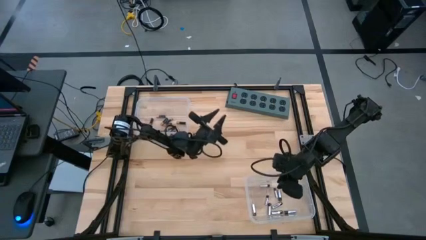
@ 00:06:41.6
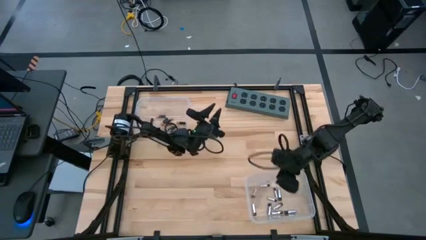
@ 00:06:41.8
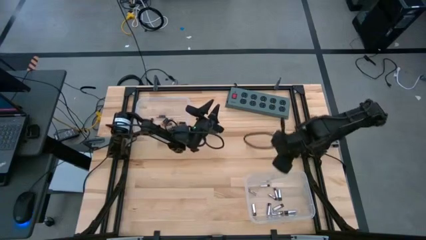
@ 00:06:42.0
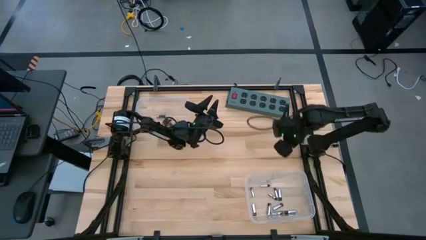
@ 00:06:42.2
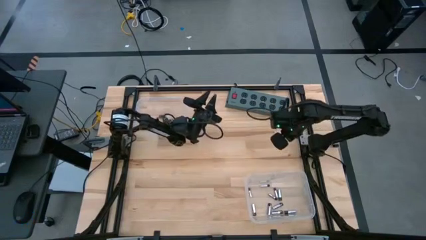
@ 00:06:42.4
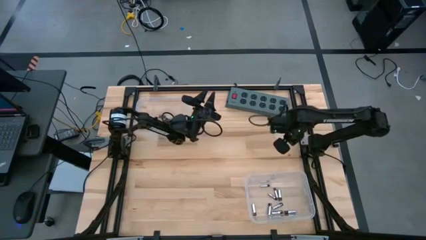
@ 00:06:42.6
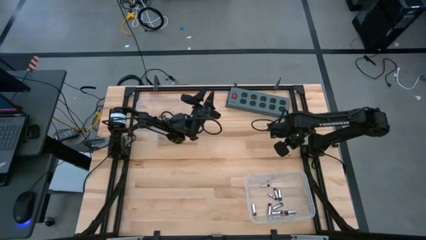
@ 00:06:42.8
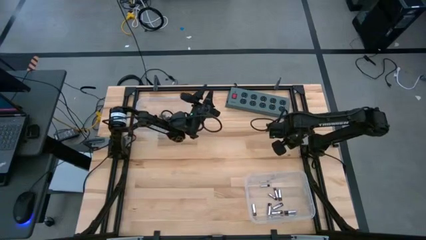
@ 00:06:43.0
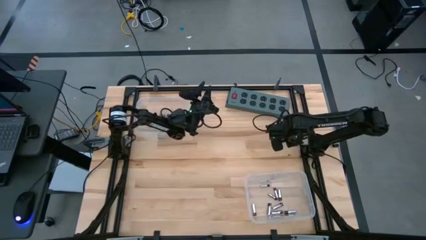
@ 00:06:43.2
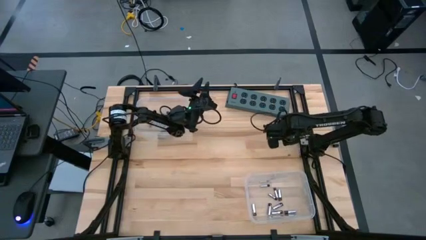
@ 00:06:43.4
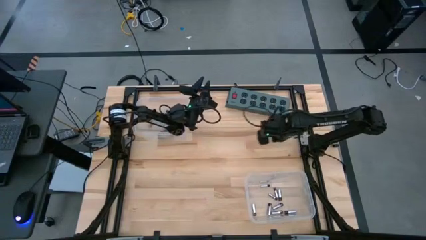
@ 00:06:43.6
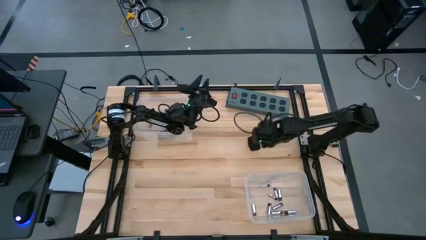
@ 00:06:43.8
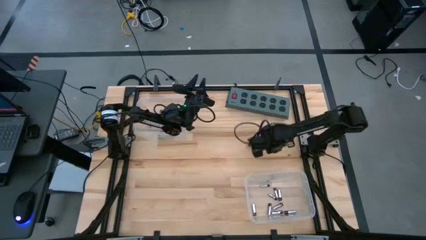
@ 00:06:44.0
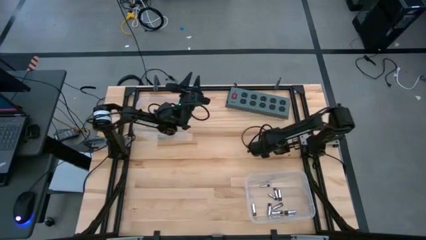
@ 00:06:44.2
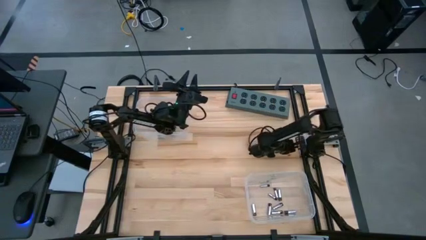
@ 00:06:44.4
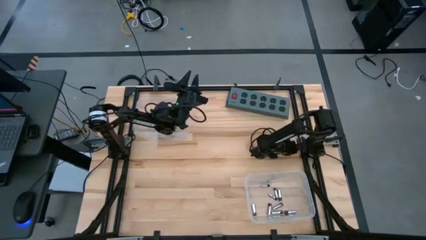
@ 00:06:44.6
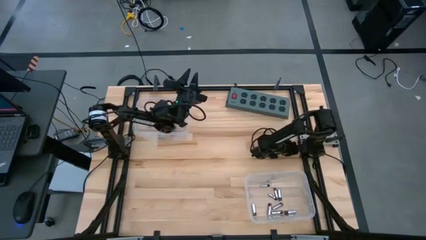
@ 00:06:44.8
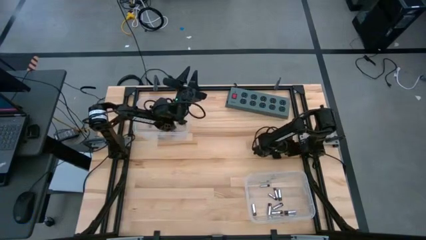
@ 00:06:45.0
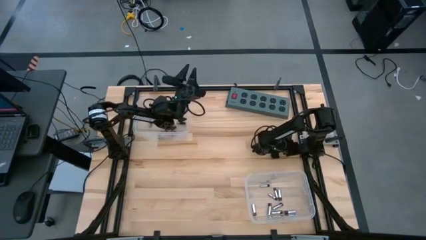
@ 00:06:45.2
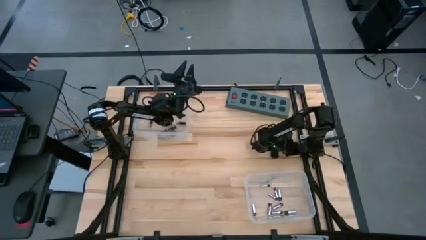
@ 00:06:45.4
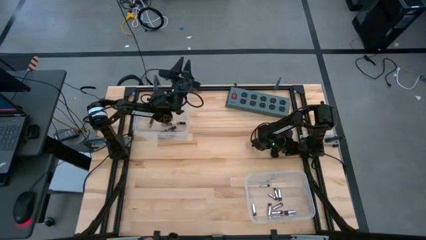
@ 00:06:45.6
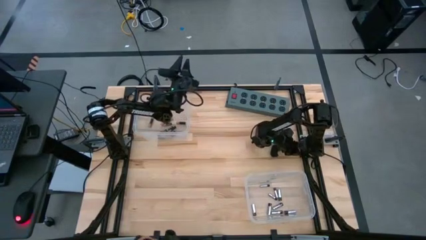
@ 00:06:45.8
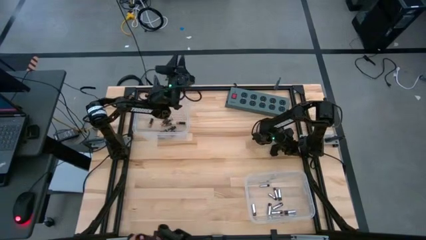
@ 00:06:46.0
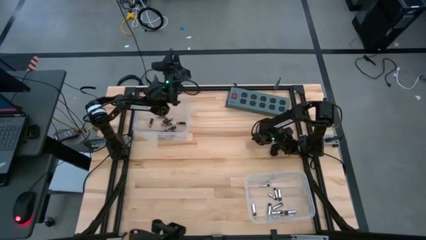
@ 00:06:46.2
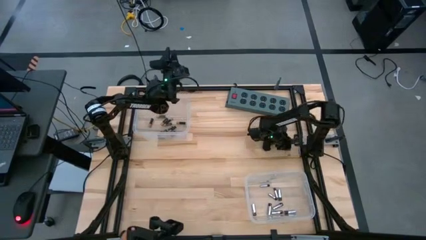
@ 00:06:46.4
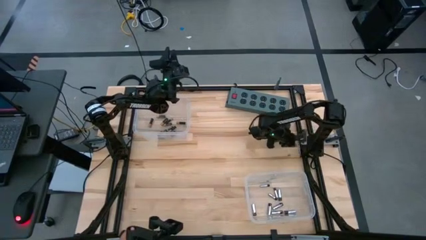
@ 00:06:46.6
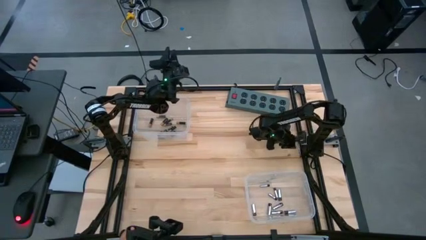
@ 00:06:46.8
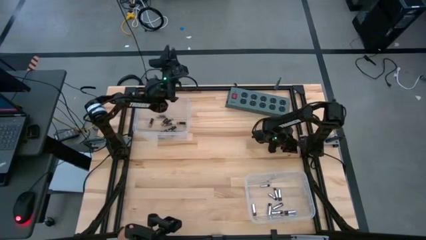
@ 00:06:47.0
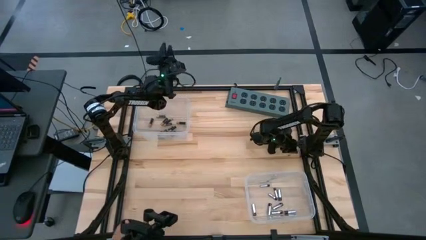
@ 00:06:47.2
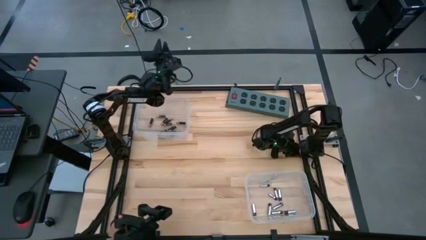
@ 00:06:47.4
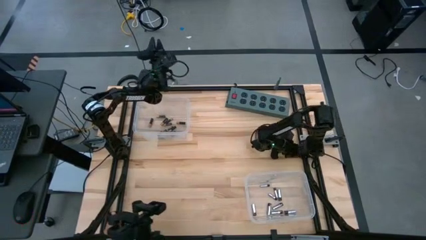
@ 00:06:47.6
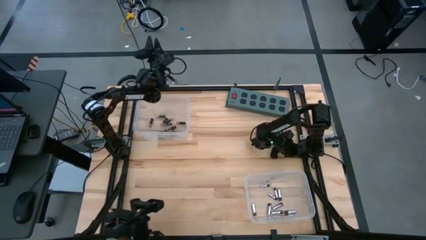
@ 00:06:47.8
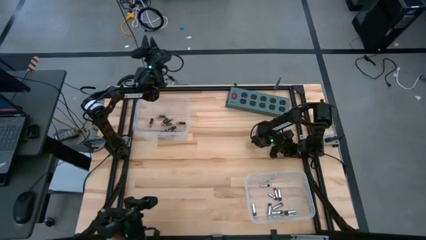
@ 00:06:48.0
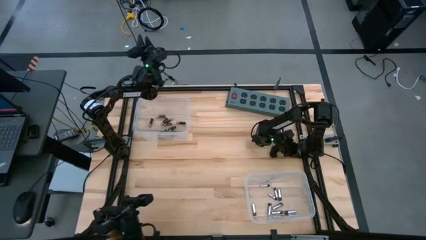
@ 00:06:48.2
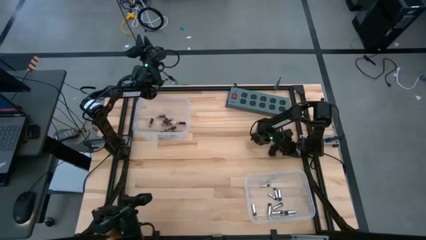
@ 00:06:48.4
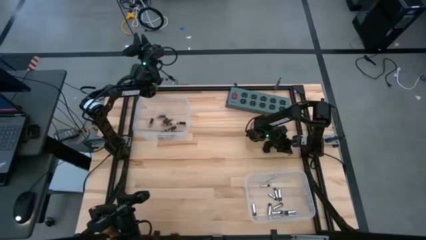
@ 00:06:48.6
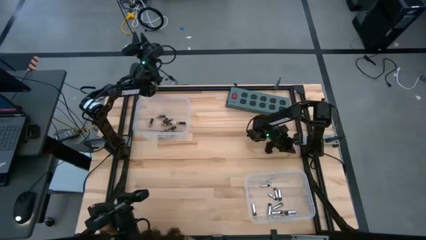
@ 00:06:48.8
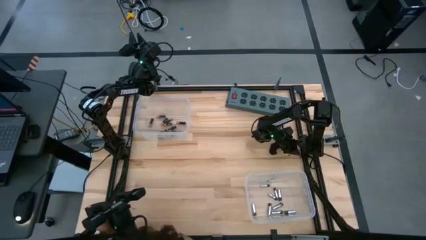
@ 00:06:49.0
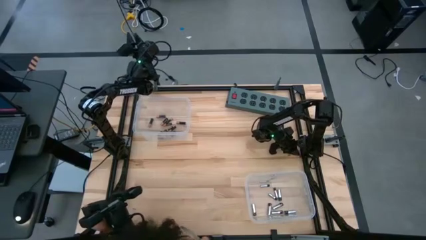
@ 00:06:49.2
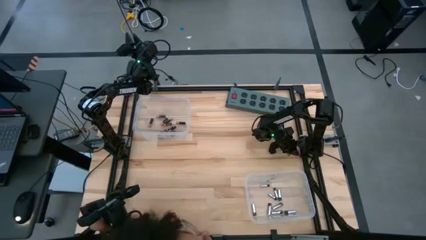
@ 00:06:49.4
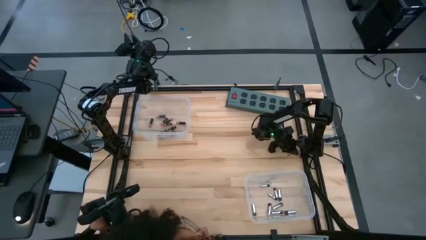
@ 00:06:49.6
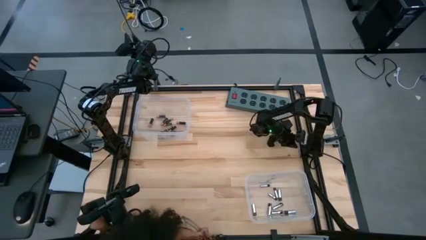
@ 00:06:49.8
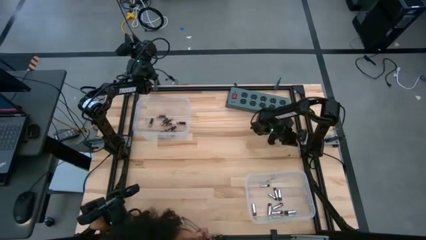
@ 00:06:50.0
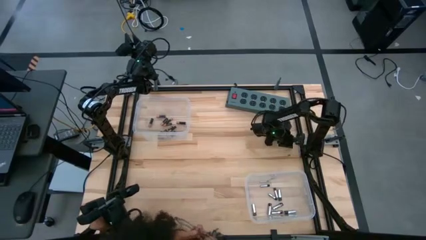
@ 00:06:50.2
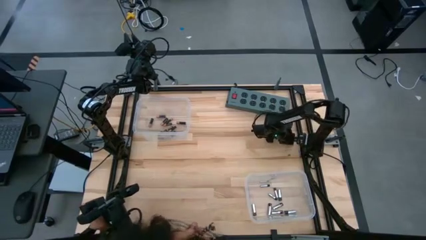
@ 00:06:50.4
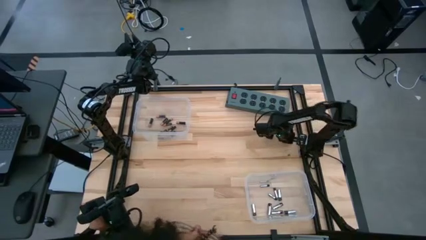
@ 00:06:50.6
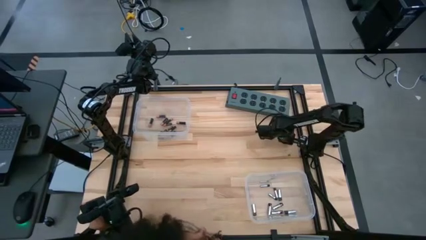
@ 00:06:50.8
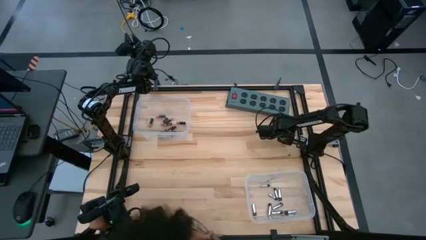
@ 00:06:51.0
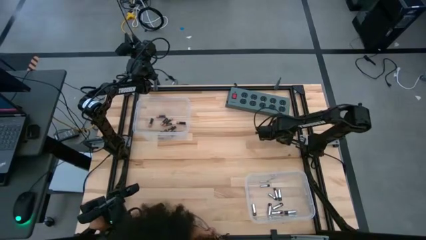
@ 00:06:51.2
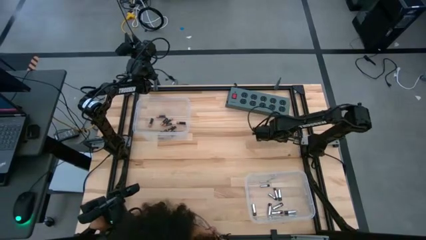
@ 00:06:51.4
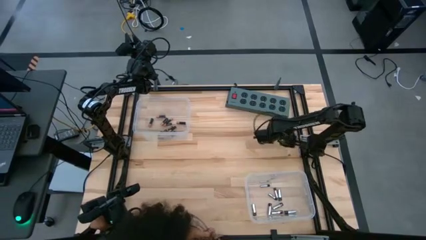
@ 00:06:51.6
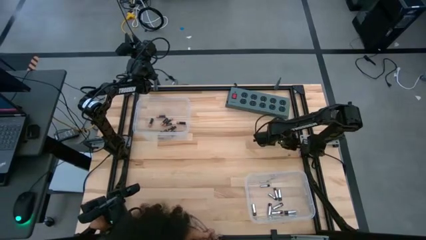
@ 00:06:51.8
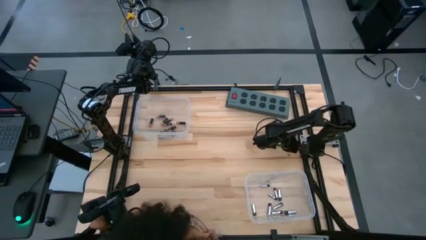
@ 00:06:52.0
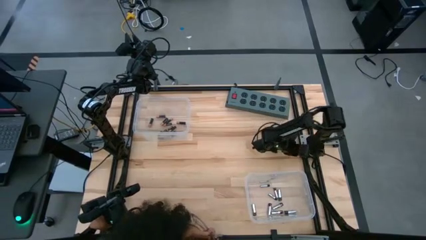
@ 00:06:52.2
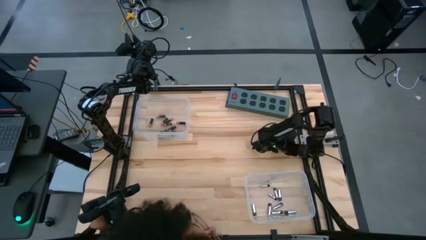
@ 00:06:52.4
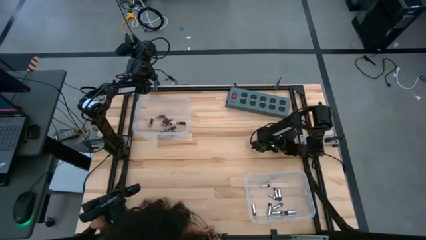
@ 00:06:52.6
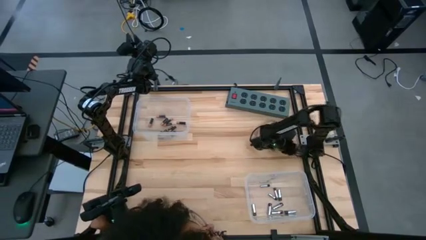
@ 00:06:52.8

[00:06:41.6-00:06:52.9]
Task: Sort batteries
Put the silver battery into the bottom transparent bin

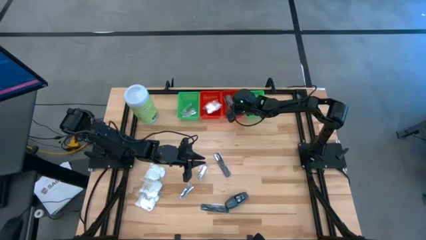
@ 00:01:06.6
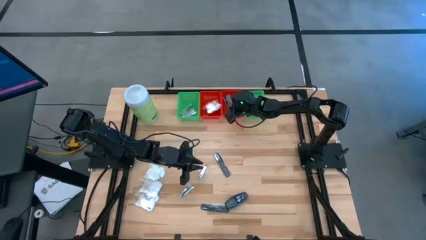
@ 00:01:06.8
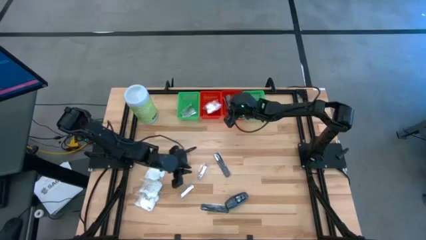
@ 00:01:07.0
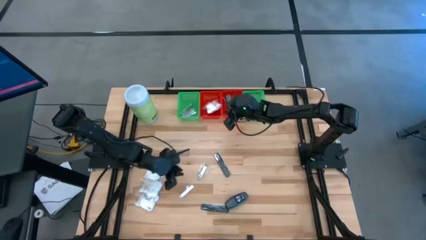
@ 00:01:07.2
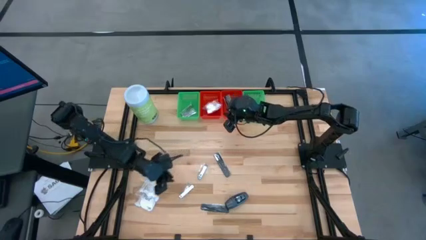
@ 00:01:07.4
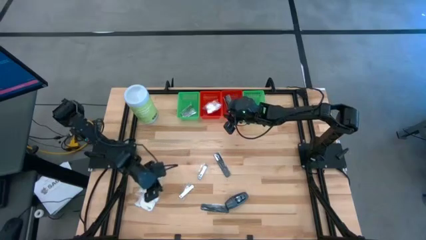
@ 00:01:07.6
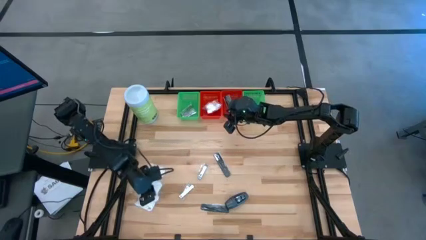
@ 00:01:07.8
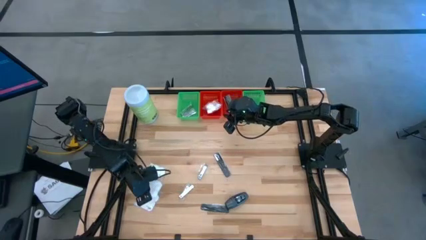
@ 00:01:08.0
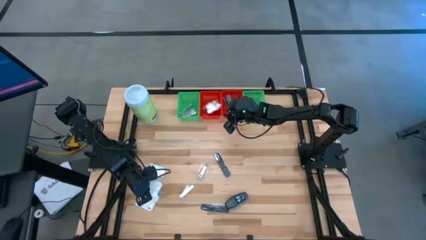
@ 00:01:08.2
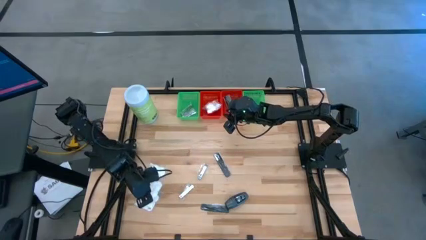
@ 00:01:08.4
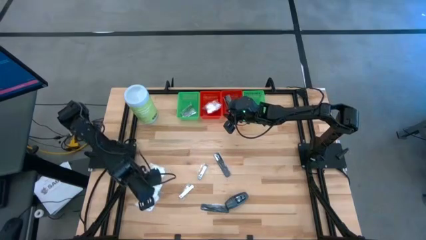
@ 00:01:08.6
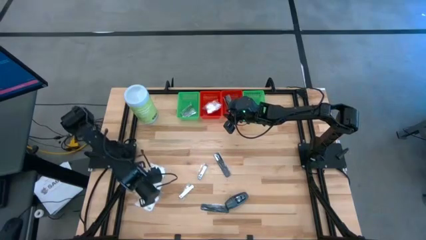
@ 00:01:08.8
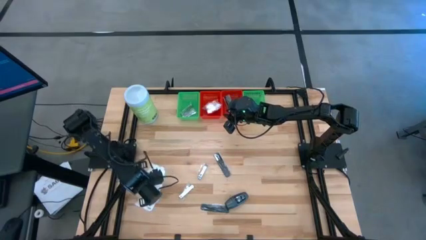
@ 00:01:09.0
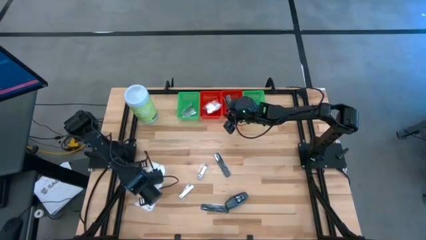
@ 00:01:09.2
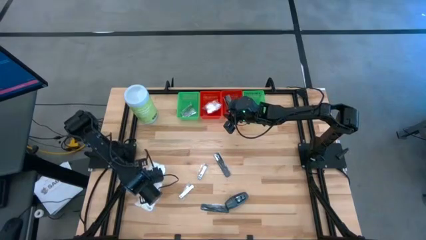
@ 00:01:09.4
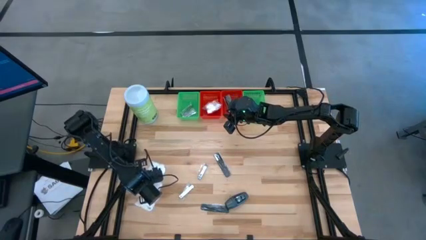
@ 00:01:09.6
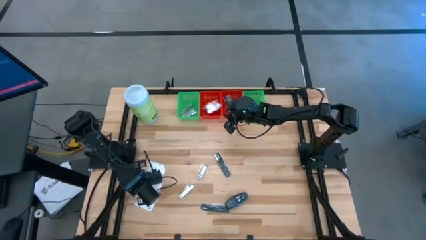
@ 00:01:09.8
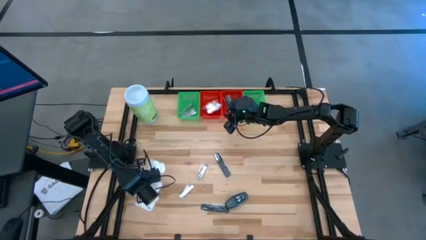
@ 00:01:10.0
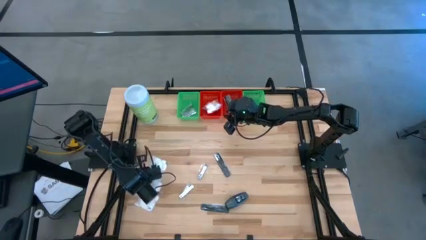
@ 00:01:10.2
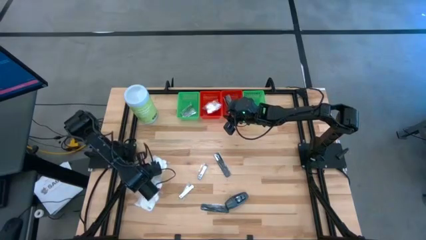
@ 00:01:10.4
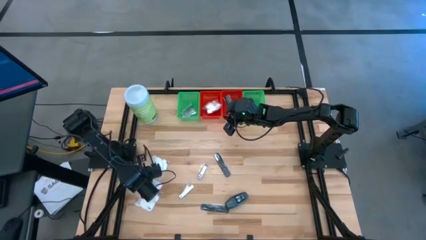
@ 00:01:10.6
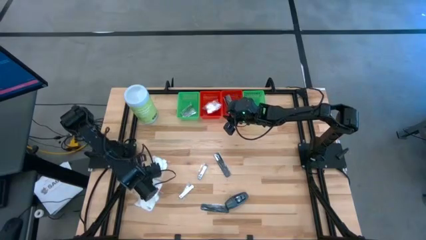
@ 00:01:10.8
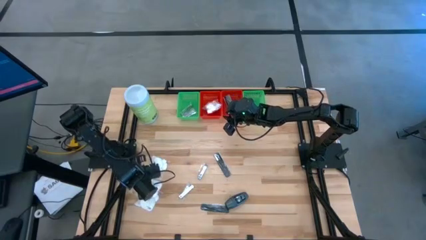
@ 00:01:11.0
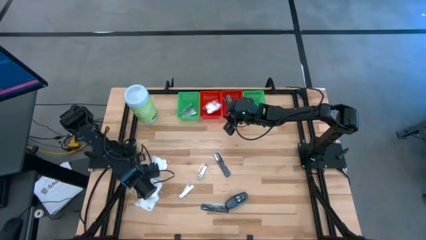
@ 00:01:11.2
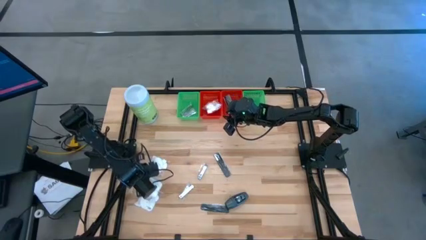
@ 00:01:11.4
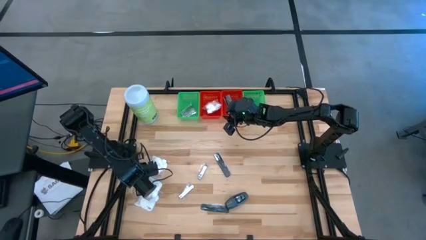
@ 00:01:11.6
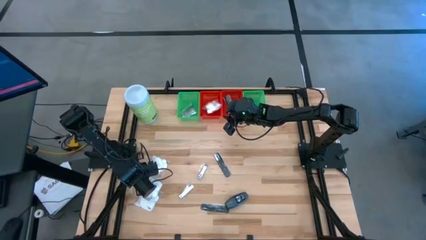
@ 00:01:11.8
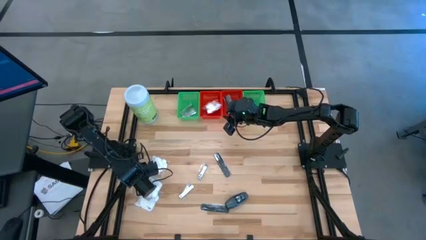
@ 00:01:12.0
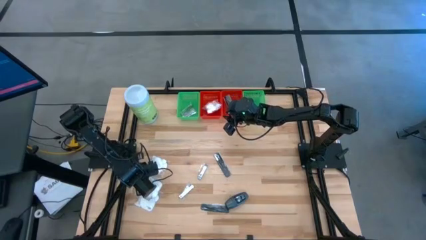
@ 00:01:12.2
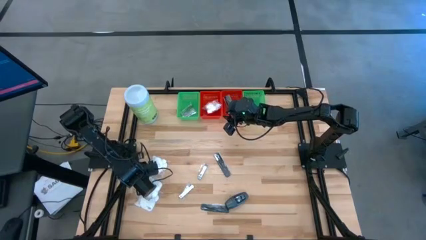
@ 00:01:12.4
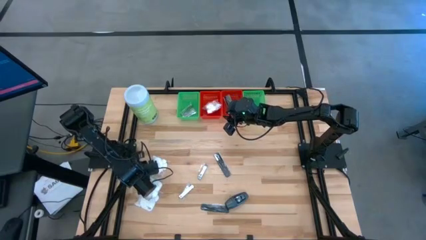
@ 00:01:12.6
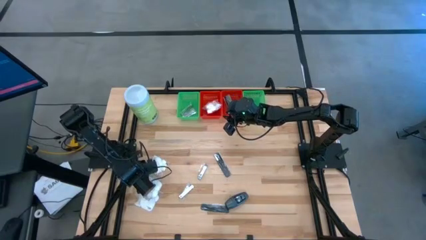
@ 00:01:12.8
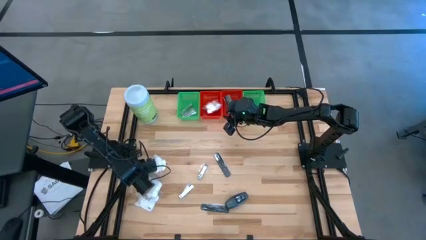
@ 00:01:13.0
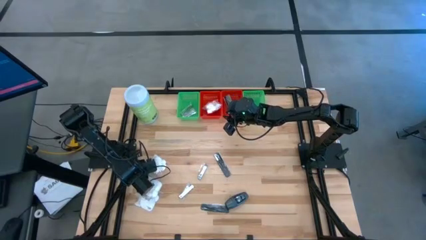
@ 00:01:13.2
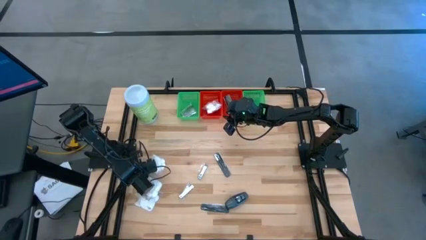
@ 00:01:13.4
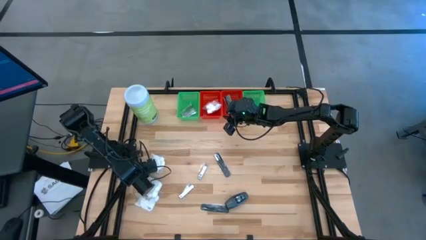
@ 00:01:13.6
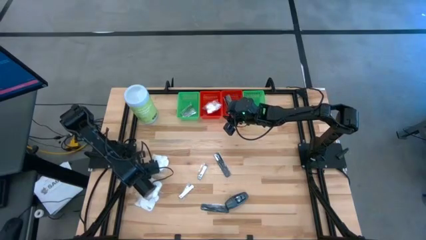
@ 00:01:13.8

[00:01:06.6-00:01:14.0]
Task: Pick & Place Travel size toiletries
Put the white cotton pack into the left red bin
